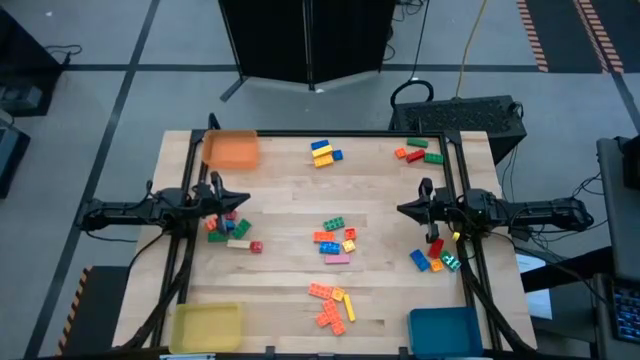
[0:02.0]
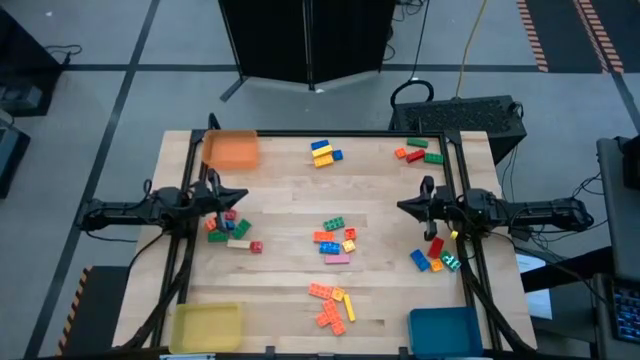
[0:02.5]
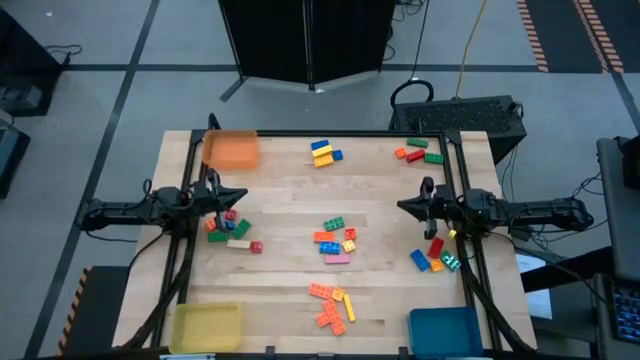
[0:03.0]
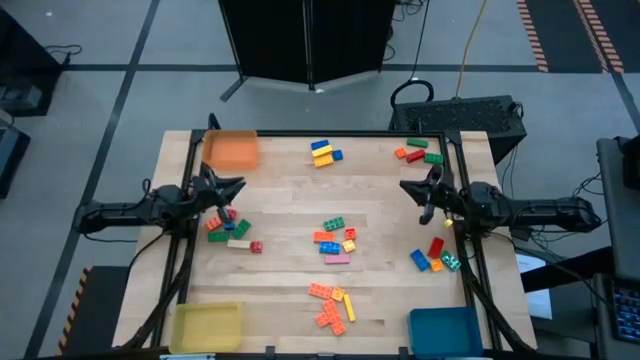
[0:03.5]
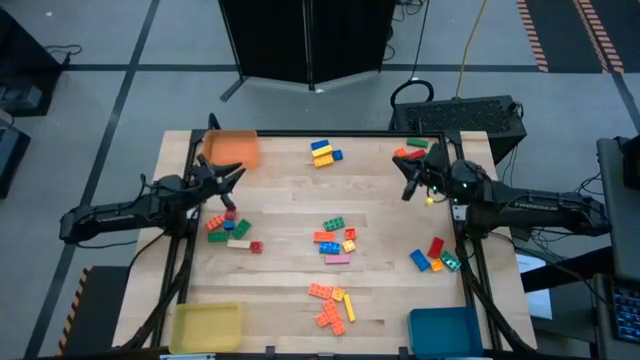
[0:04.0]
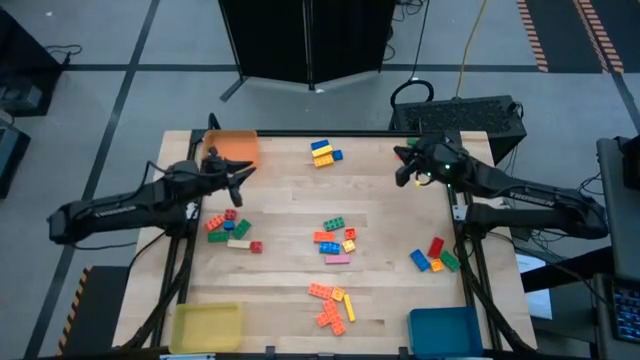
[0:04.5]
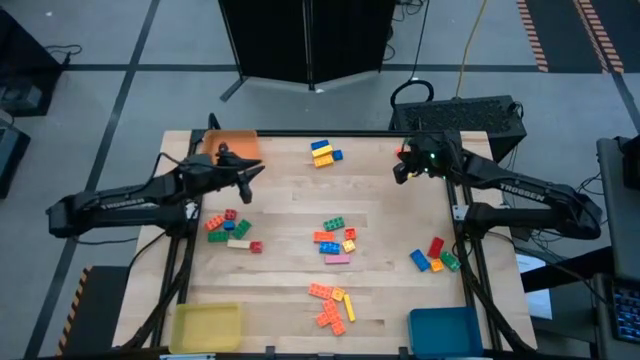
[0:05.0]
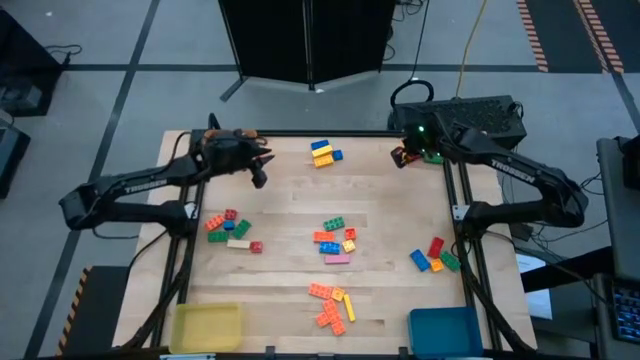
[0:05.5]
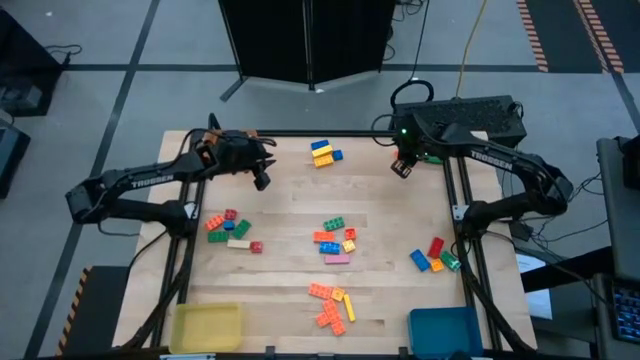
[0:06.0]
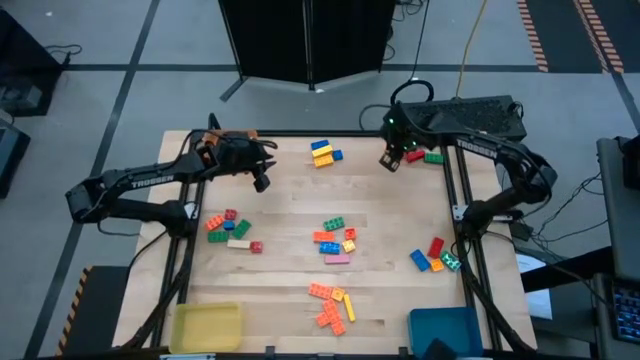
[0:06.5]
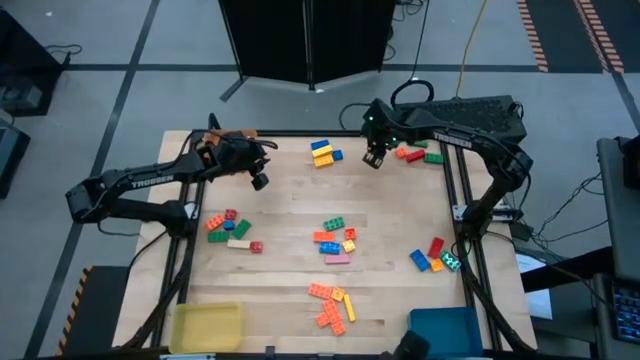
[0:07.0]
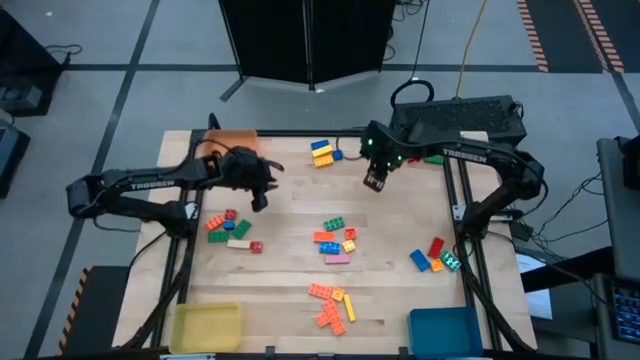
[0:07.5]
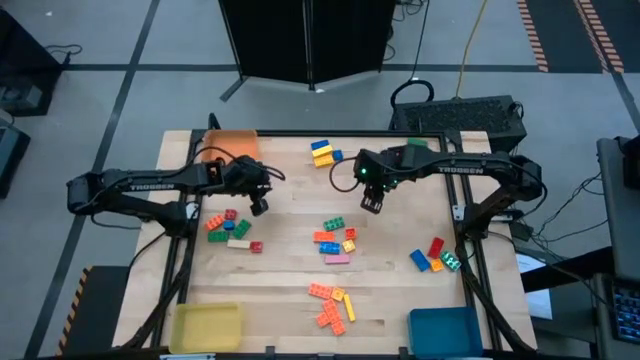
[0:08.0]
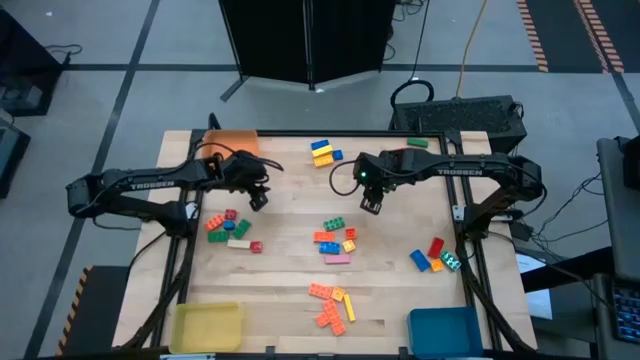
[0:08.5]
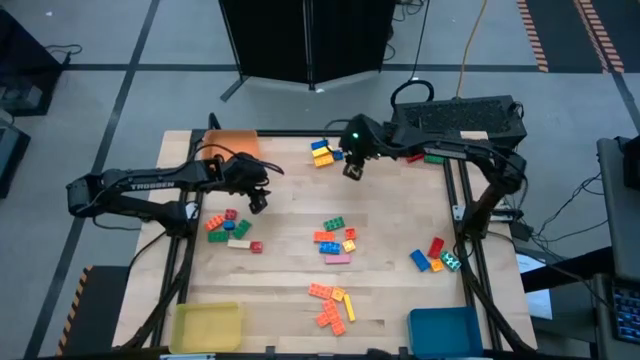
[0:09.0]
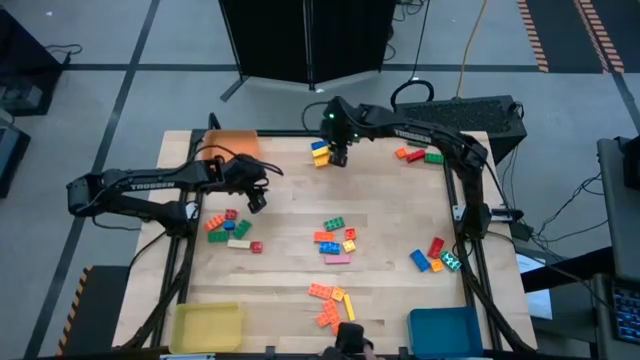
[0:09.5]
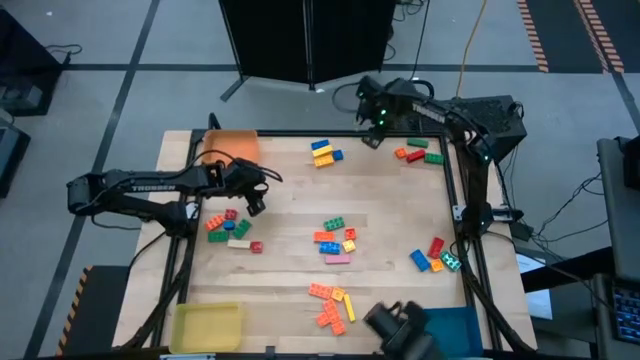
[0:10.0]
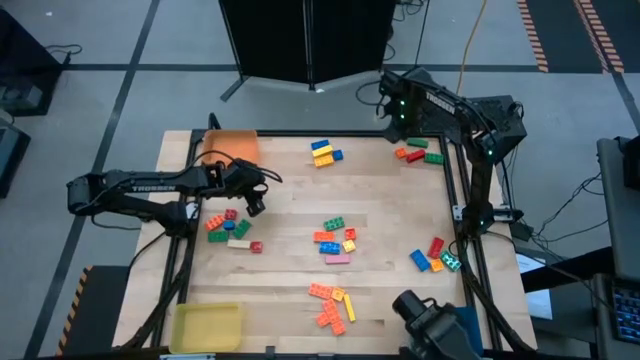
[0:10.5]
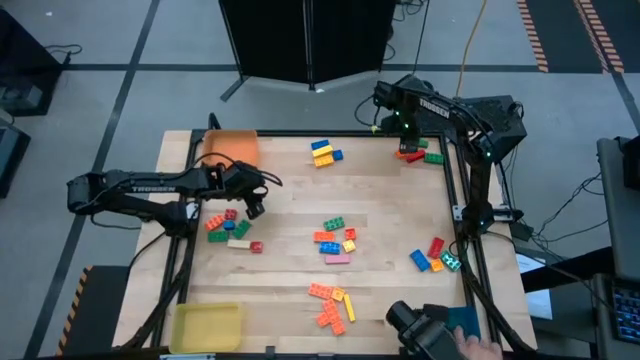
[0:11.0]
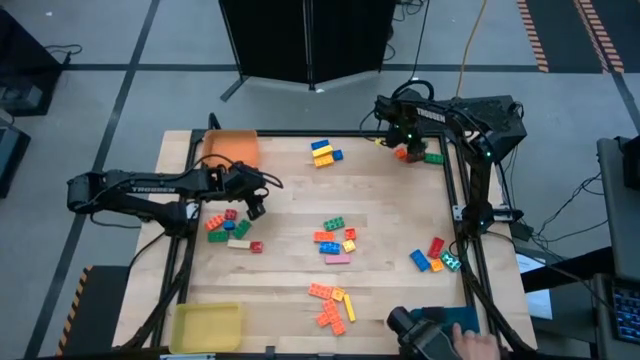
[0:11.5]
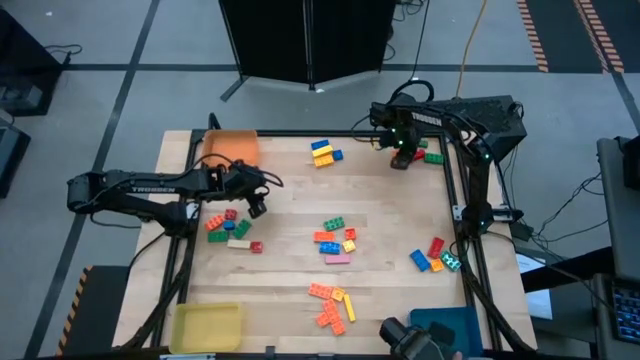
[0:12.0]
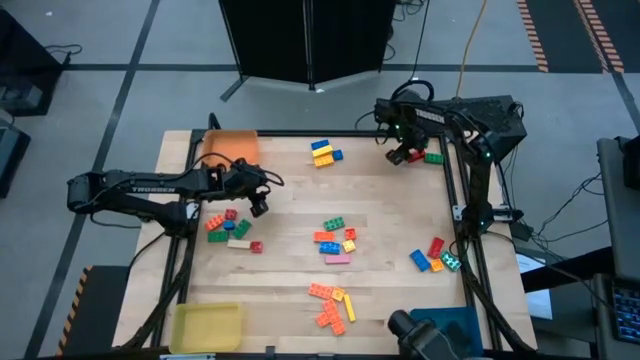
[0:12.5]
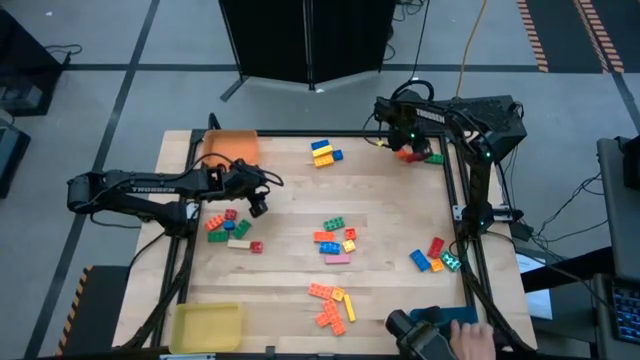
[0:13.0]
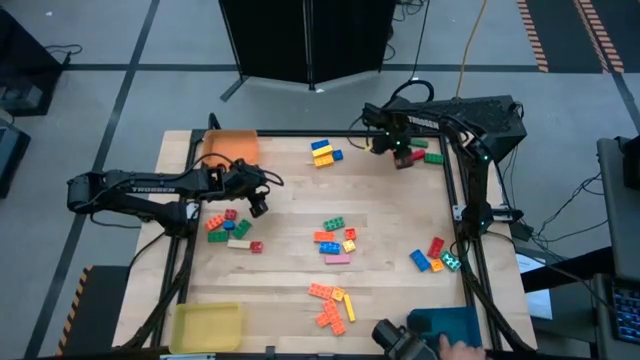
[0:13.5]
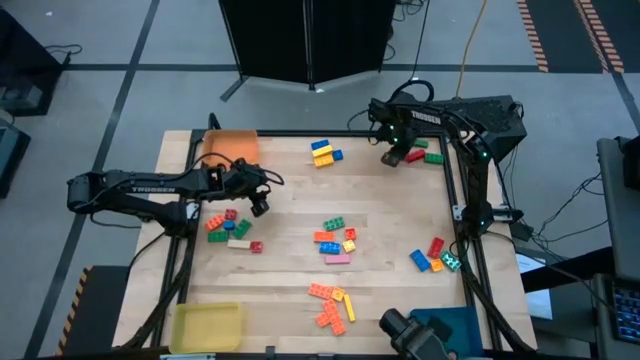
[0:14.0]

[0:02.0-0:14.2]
Task: Sort blocks by size
Put the orange 4 stud game piece into the orange bin

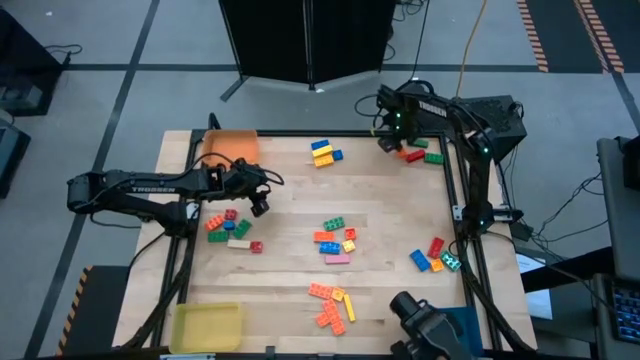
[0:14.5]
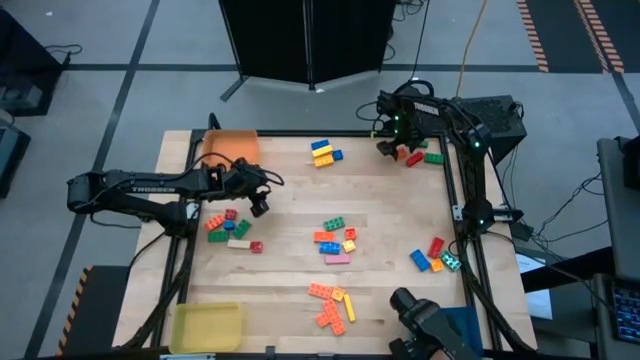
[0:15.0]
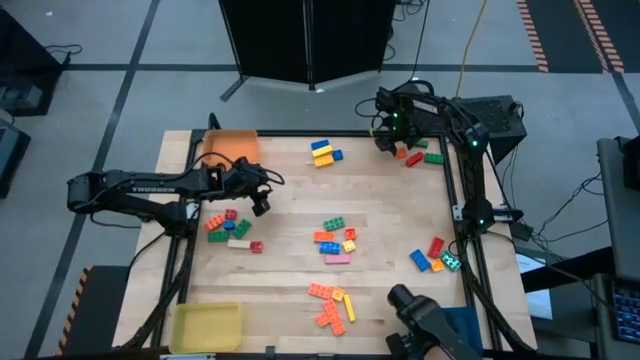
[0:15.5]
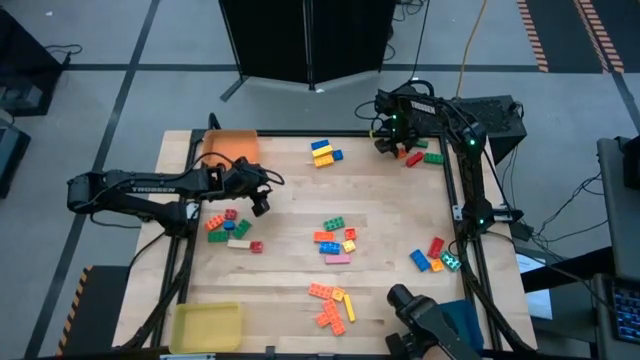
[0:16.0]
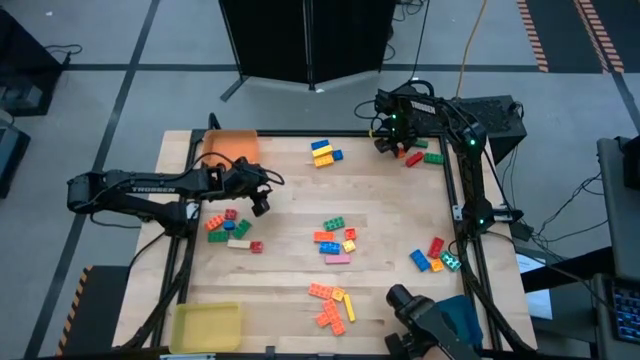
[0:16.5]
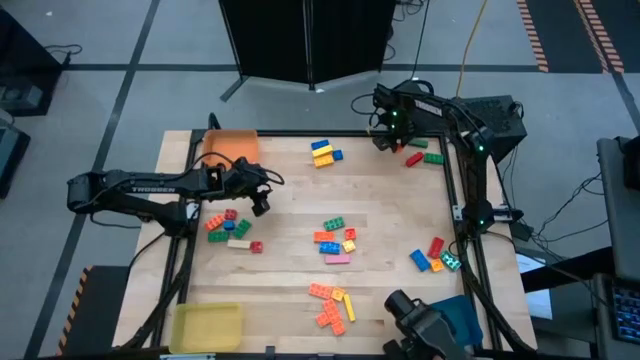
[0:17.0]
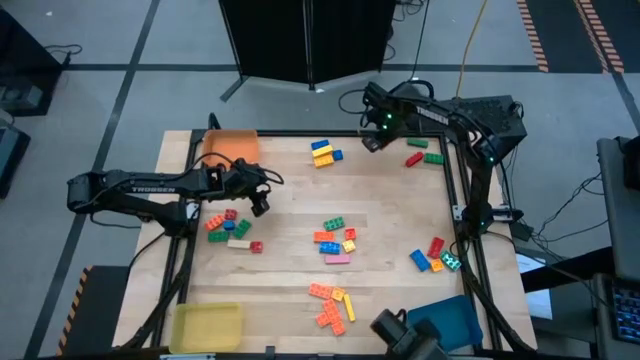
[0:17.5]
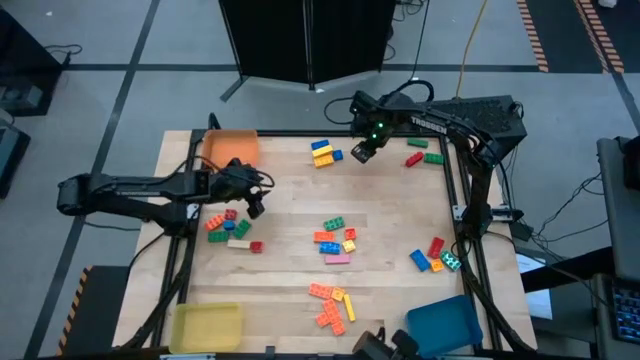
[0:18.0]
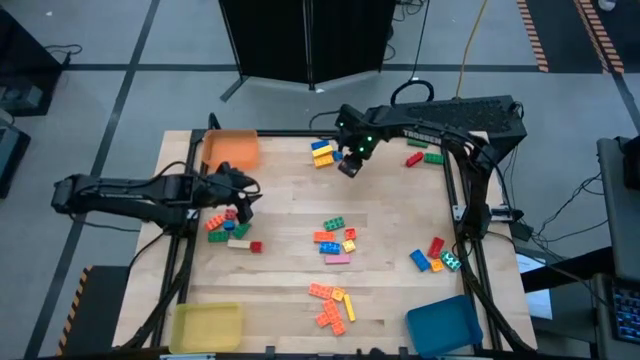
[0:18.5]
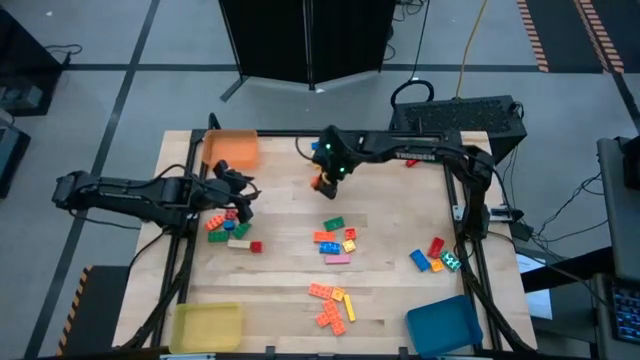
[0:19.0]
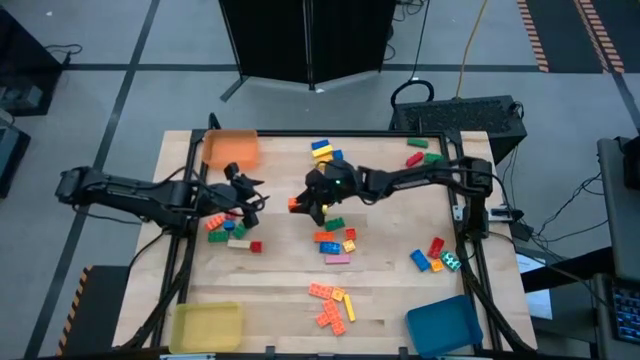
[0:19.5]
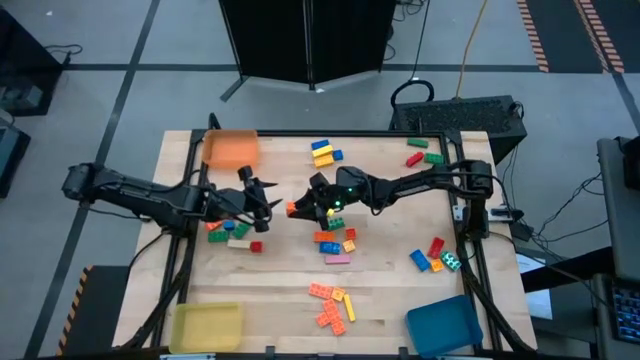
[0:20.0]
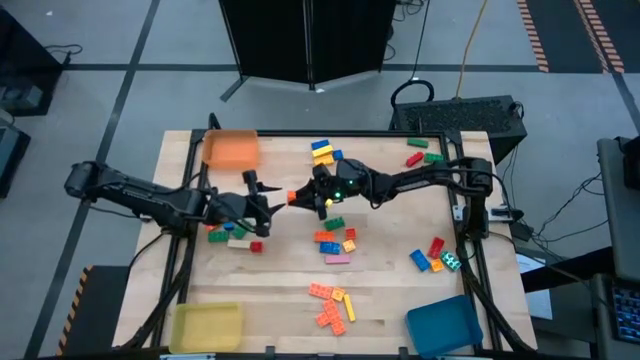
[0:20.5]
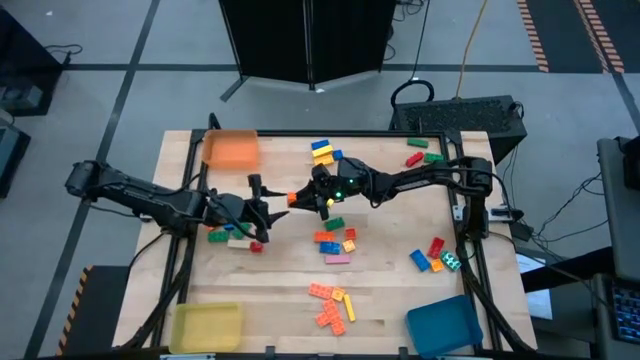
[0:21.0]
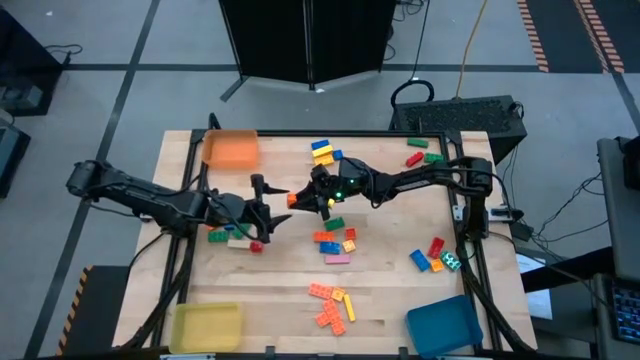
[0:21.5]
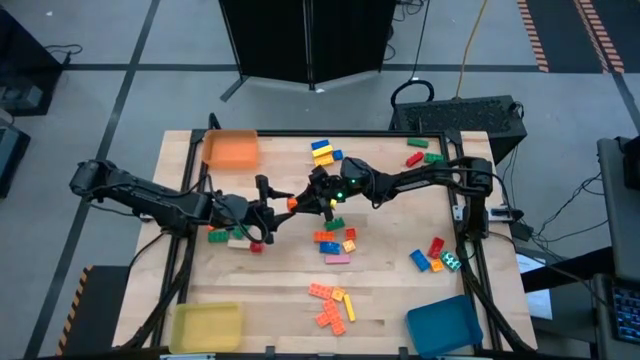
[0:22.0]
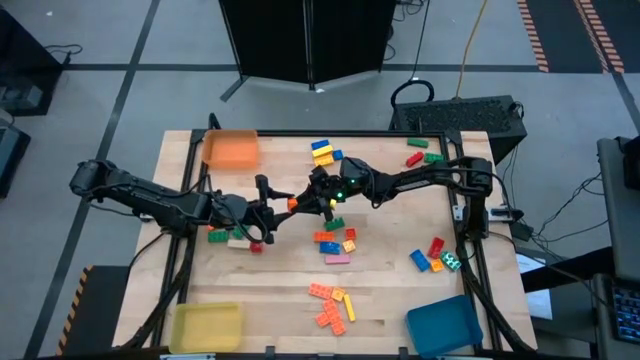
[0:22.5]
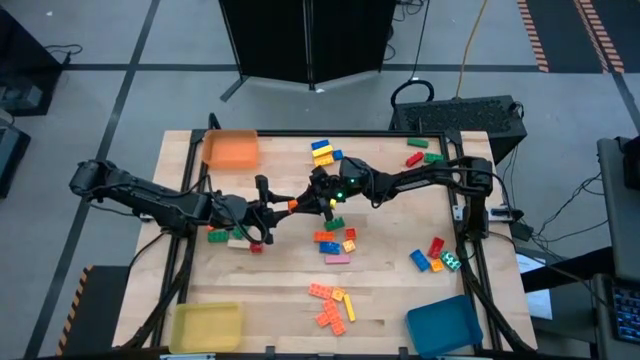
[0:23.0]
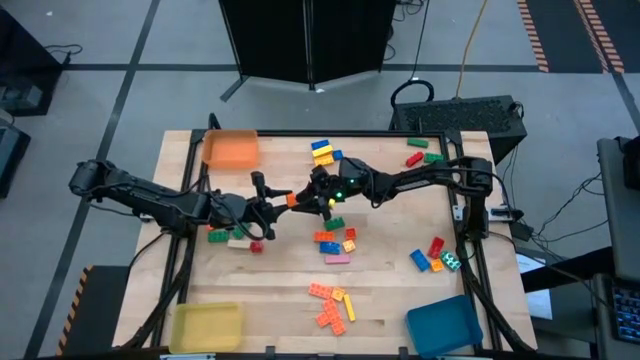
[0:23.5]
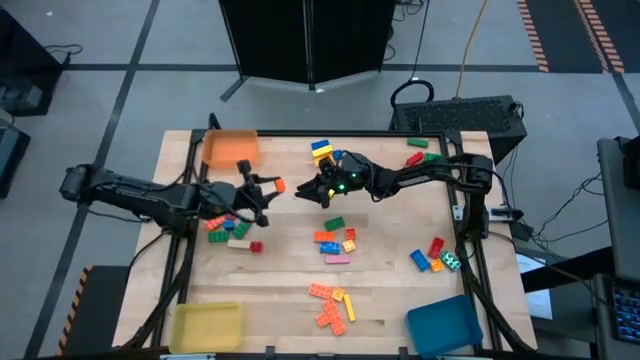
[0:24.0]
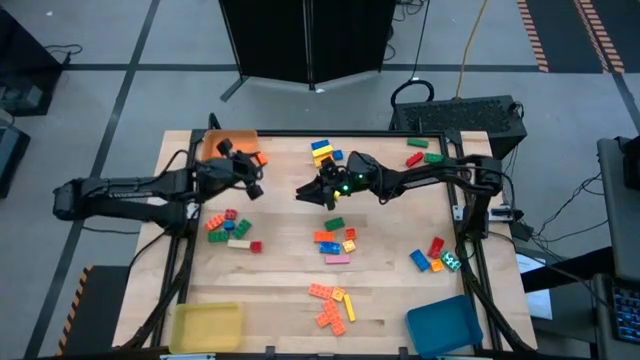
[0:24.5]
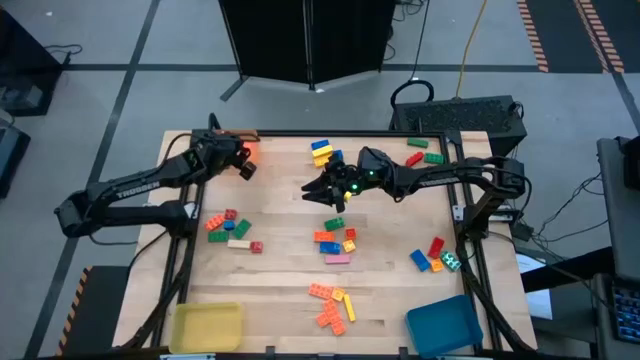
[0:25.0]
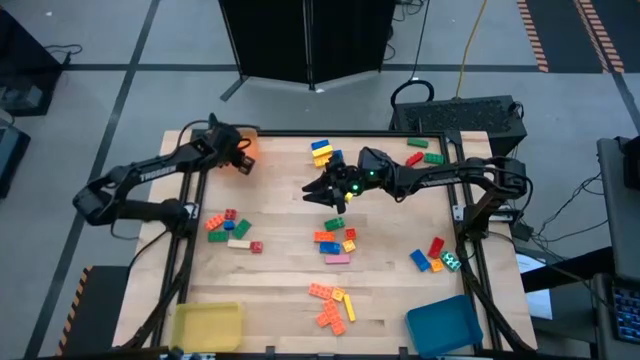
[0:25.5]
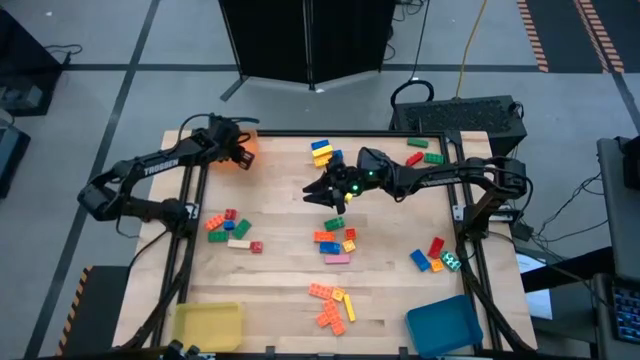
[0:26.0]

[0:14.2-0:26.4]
Put the orange 4 stud game piece into the orange bin
